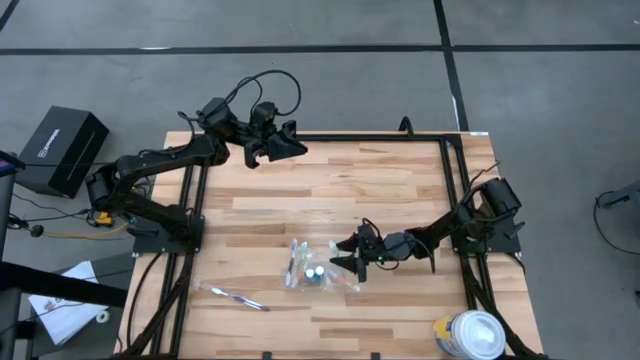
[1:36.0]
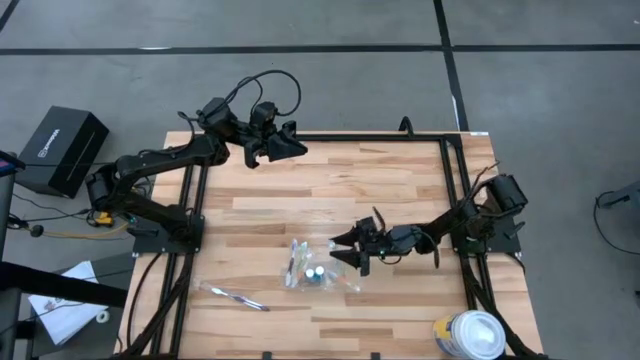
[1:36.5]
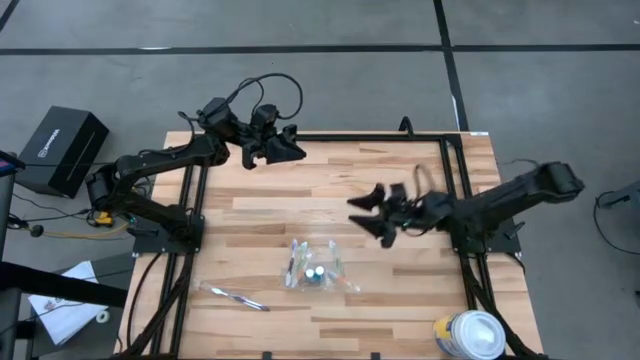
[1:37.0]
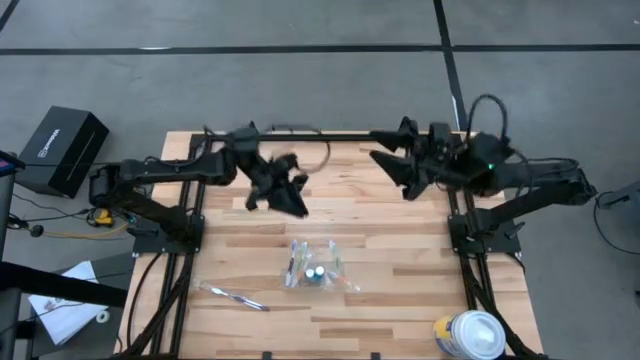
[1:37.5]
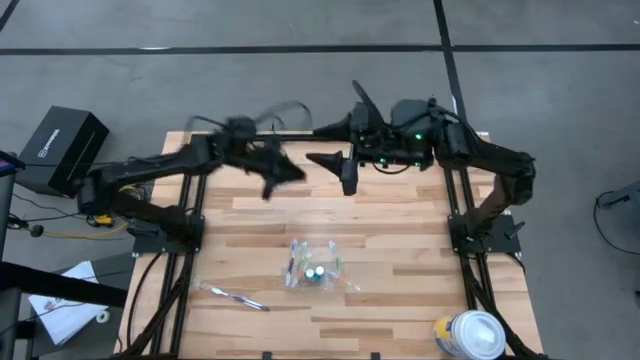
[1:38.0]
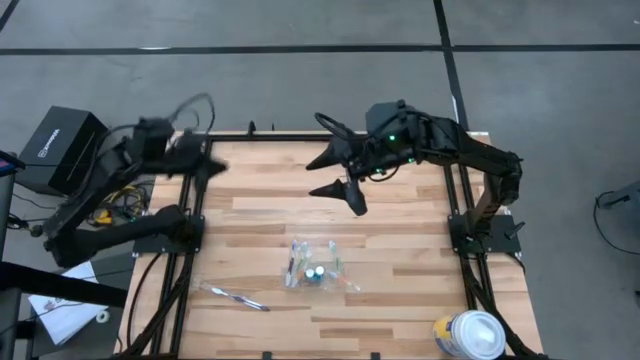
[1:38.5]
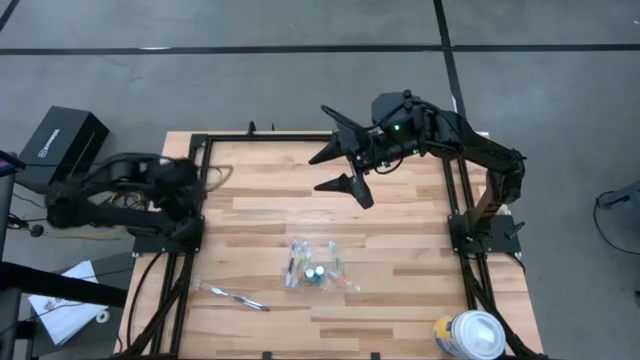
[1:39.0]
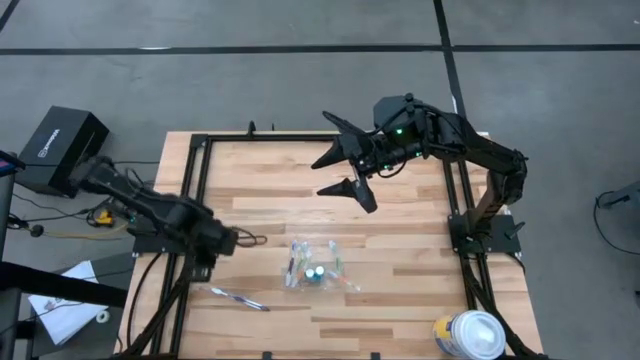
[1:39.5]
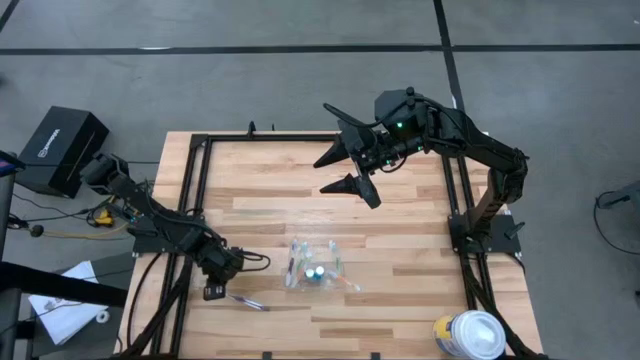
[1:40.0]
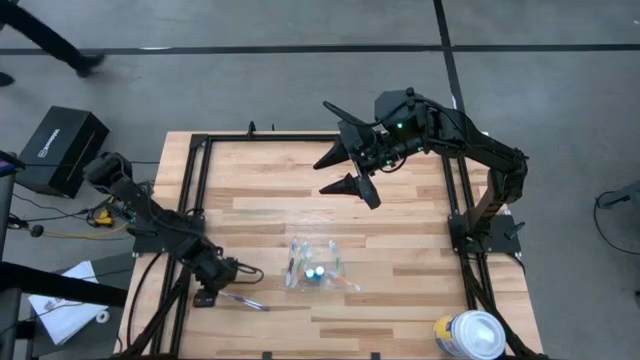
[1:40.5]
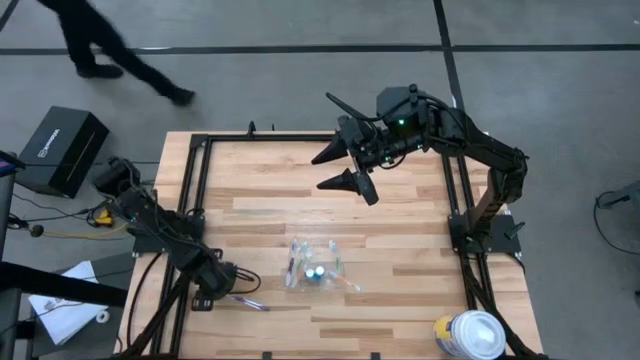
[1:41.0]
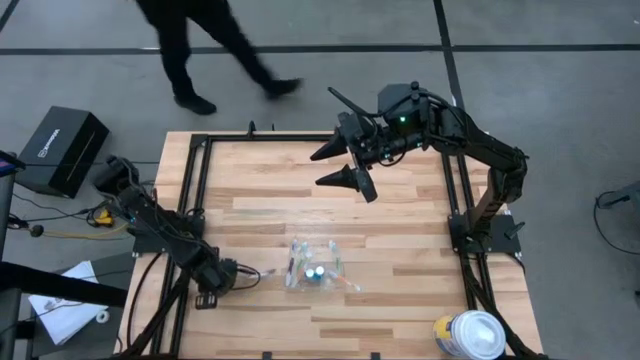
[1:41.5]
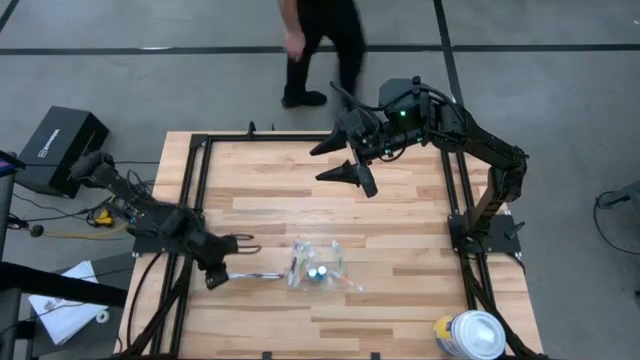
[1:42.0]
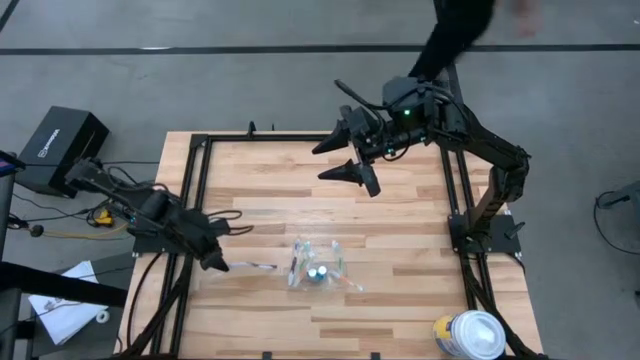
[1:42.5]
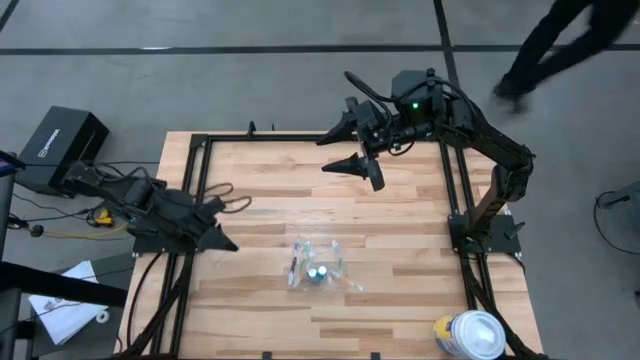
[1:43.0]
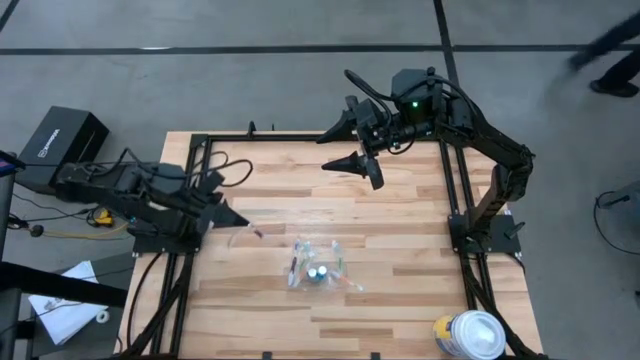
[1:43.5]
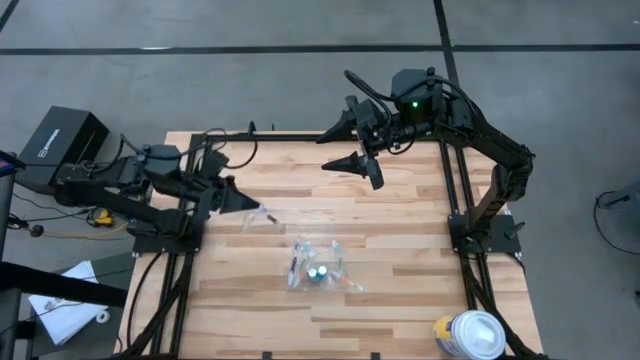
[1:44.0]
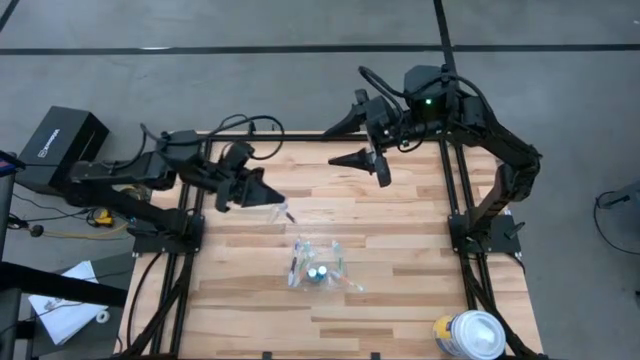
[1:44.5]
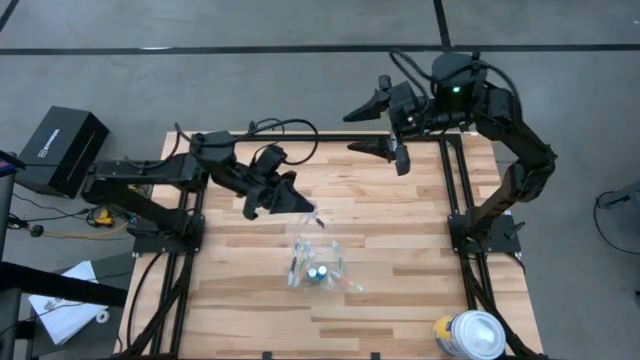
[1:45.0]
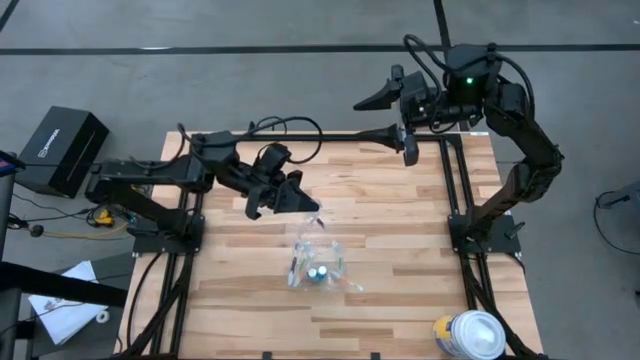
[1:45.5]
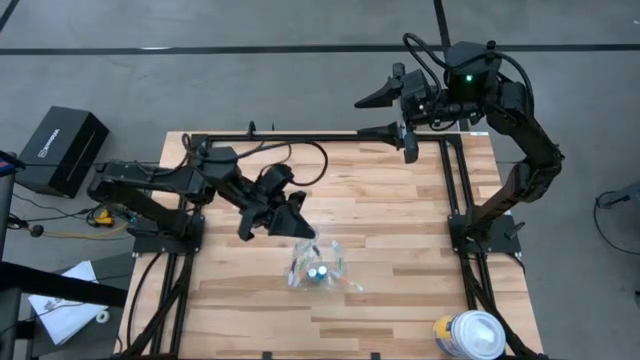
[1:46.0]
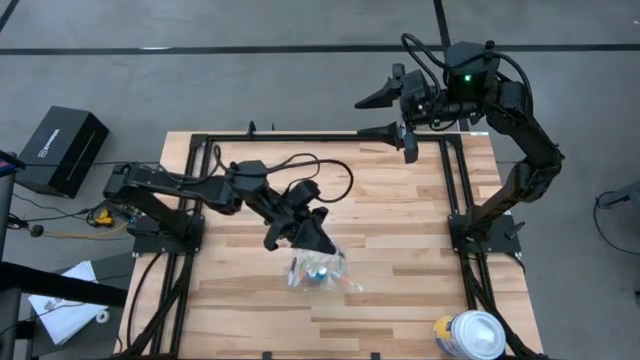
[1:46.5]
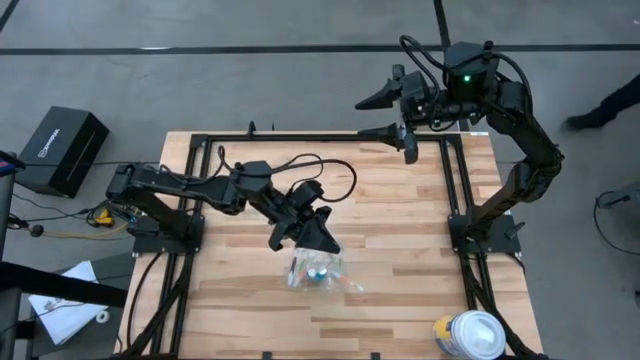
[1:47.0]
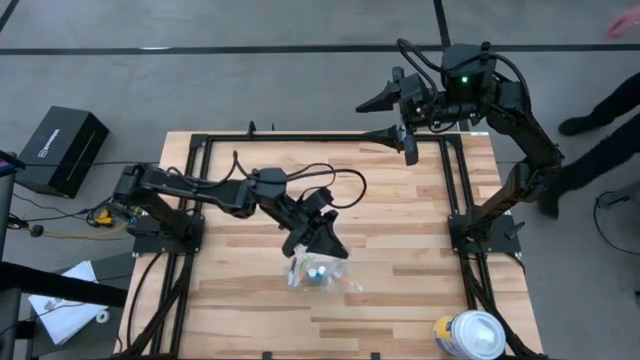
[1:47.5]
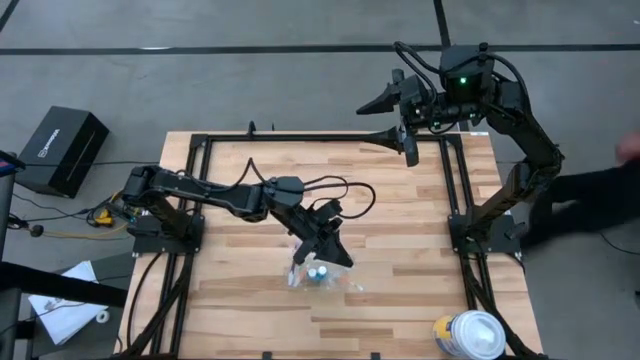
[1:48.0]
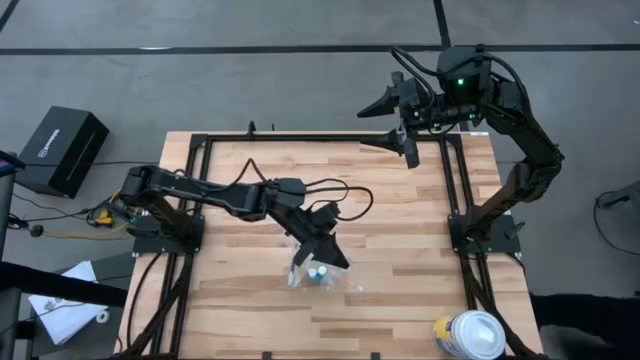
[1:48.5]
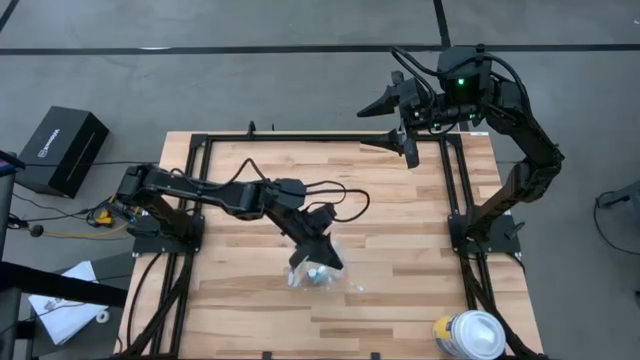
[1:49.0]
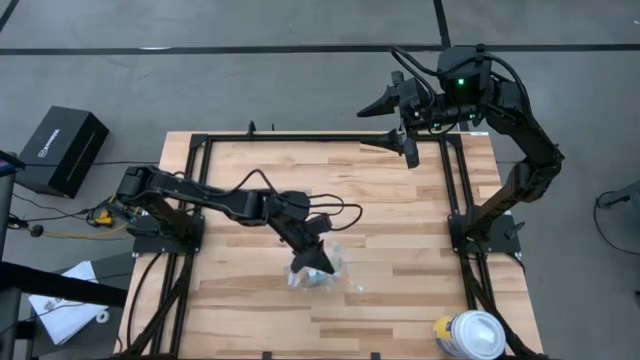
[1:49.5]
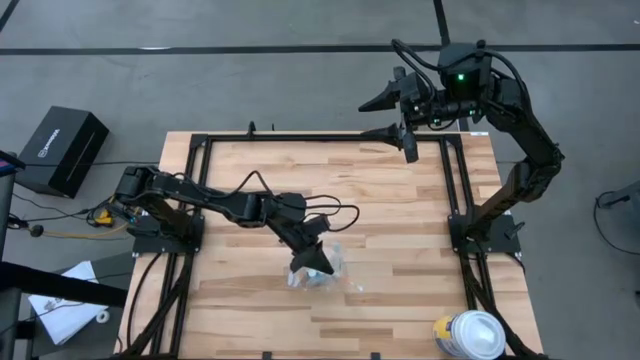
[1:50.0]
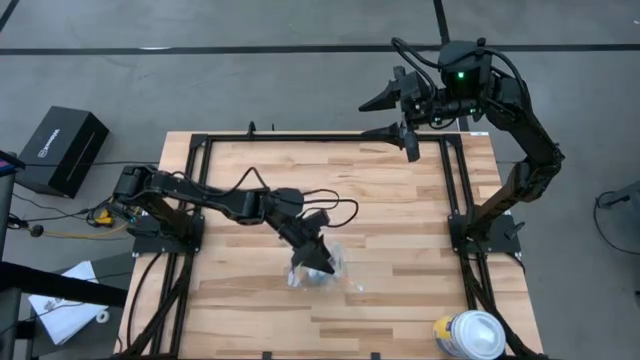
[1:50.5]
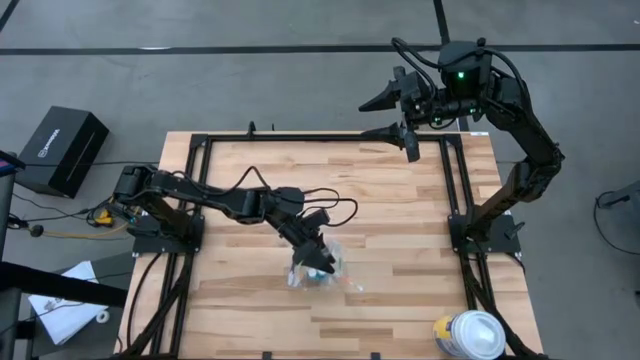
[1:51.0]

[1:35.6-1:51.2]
Task: Pick & Place toothbrushing station
Put the violet toothbrush into the transparent organizer

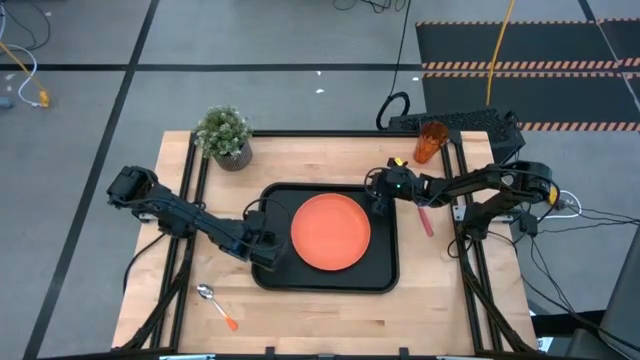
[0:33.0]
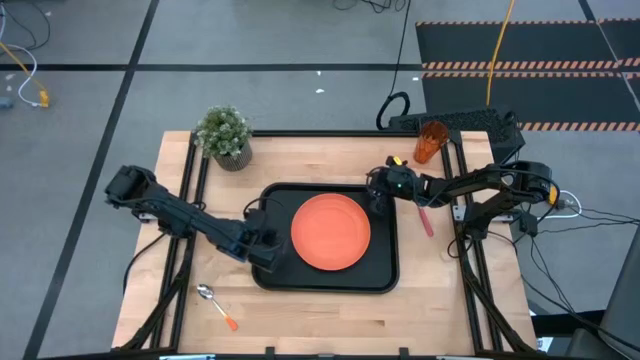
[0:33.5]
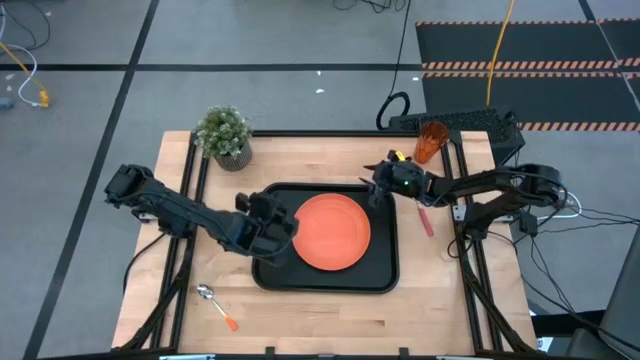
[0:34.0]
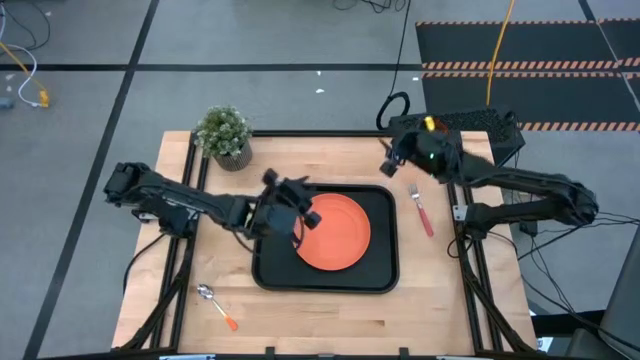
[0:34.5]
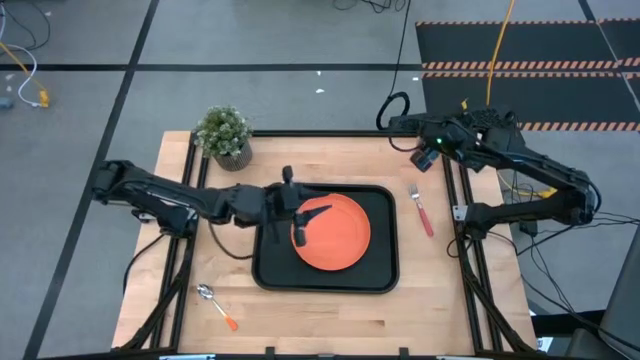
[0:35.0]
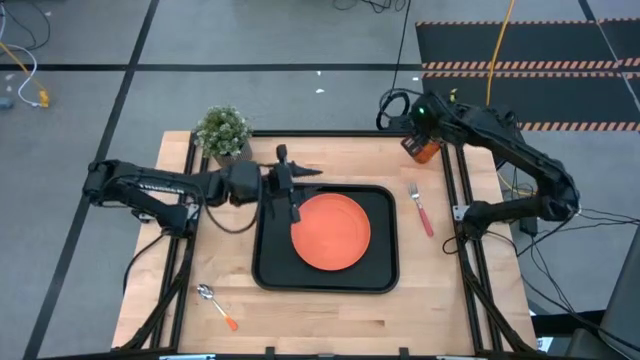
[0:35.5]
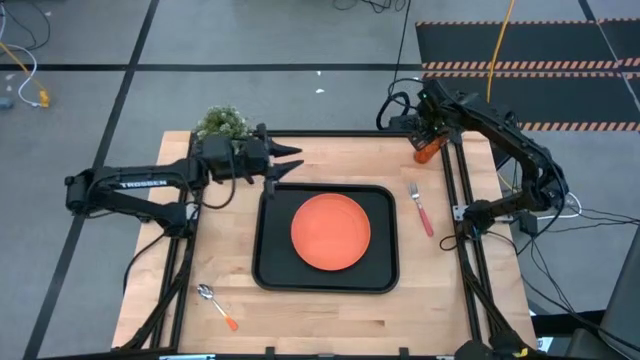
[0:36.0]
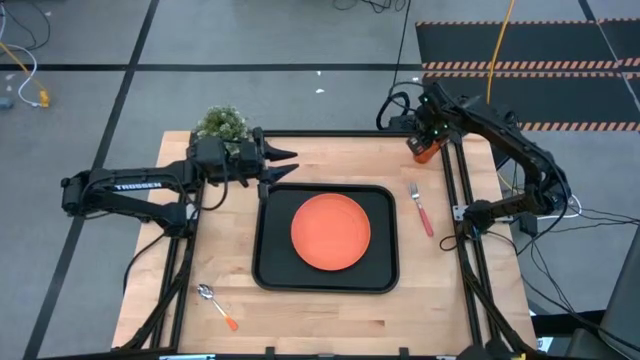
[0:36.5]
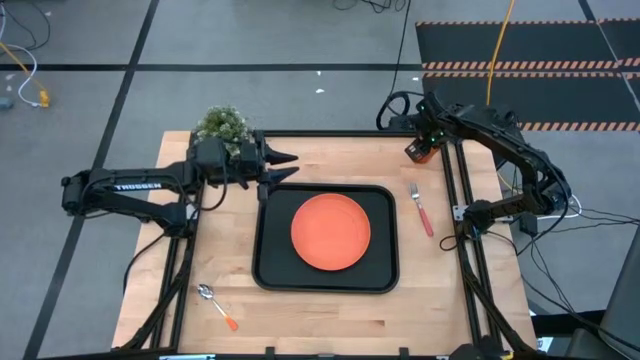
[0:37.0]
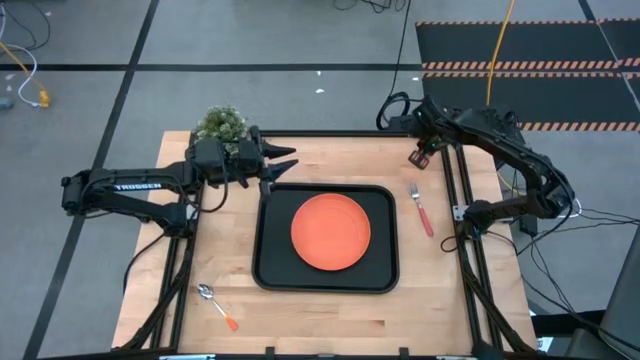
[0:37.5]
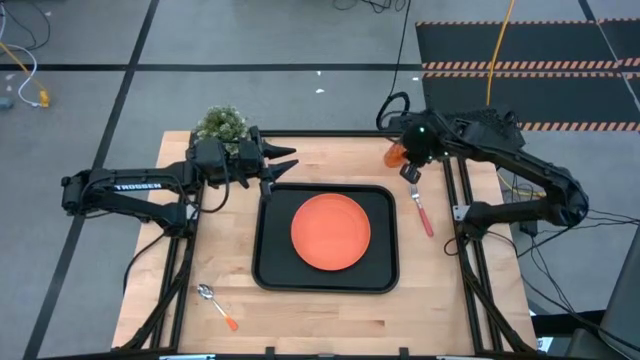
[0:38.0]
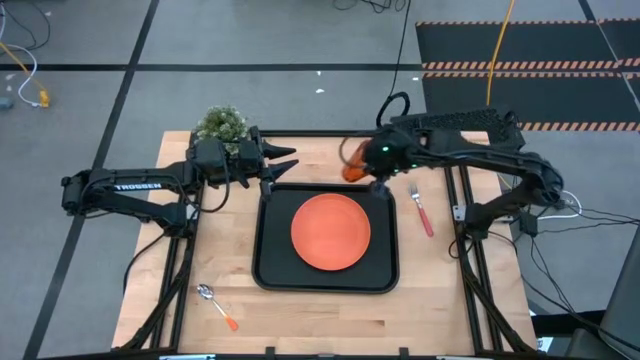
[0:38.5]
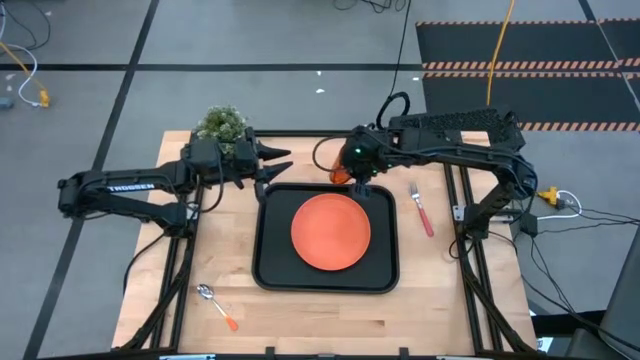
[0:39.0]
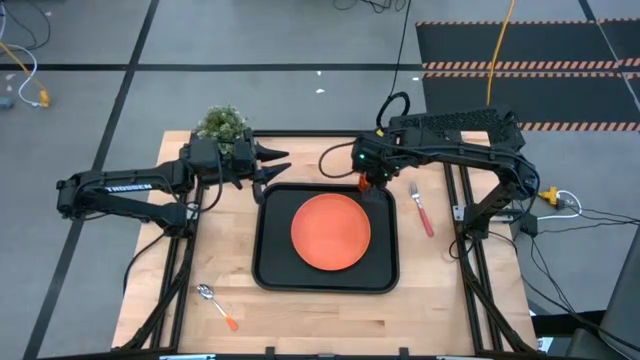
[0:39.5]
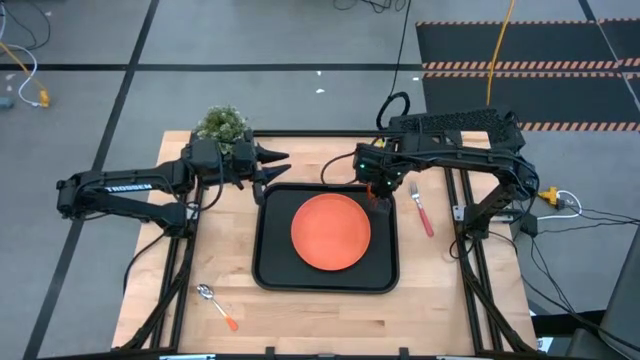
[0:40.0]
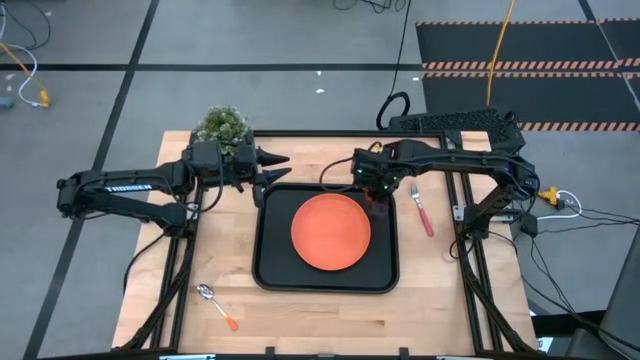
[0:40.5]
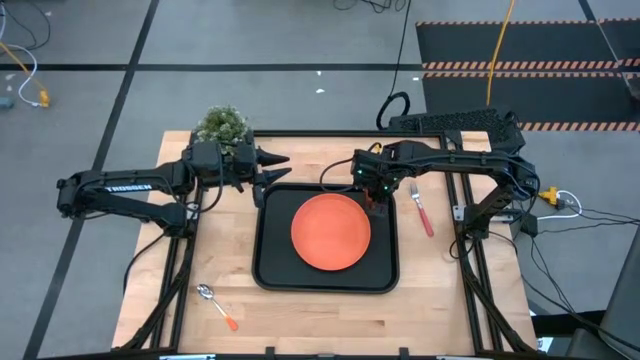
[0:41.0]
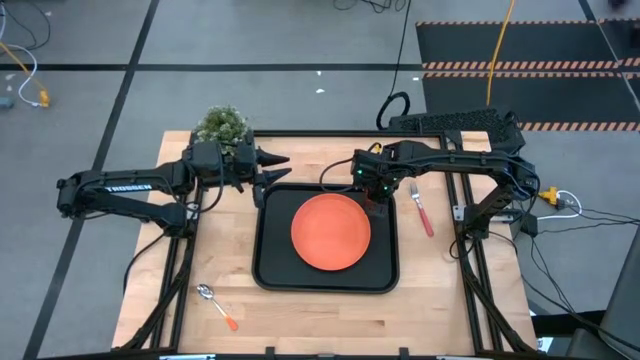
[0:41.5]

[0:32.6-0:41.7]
Task: Pick and place plate/cup/fork/spoon on tray
Put the orange cup on the black tray to the top right of the orange plate
